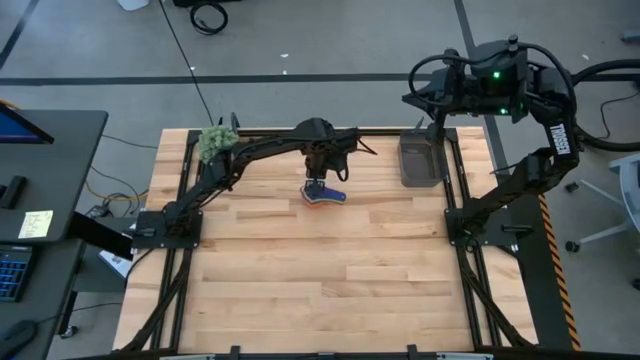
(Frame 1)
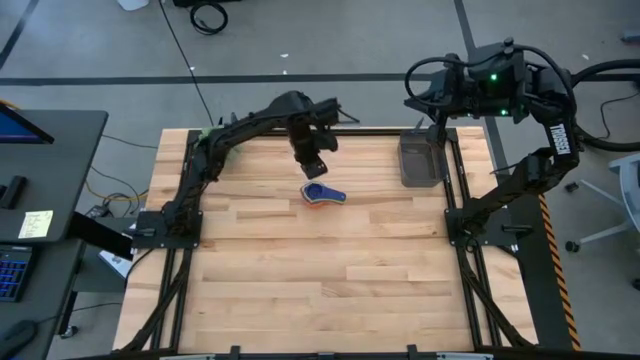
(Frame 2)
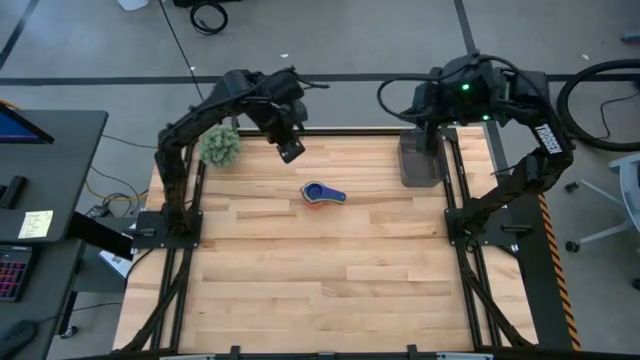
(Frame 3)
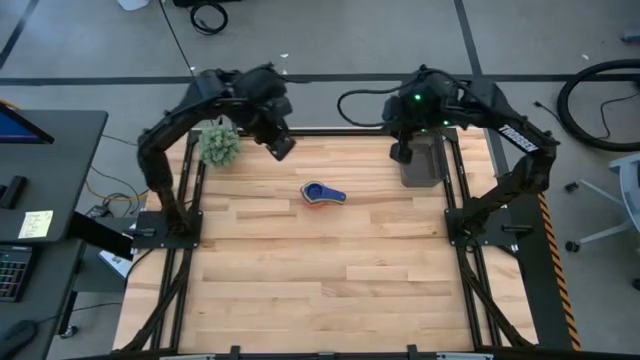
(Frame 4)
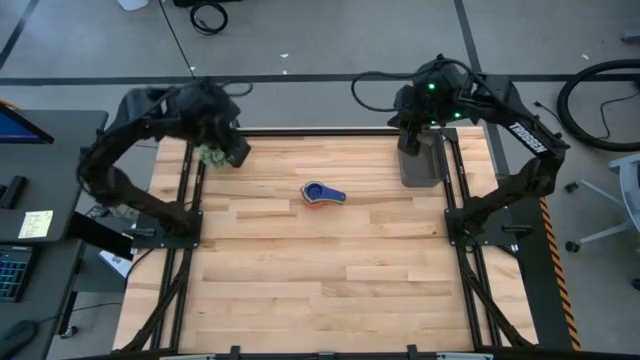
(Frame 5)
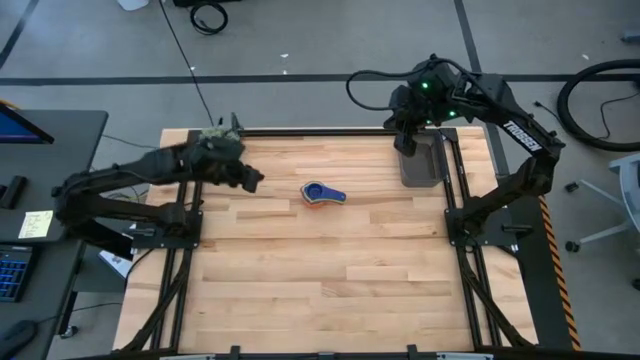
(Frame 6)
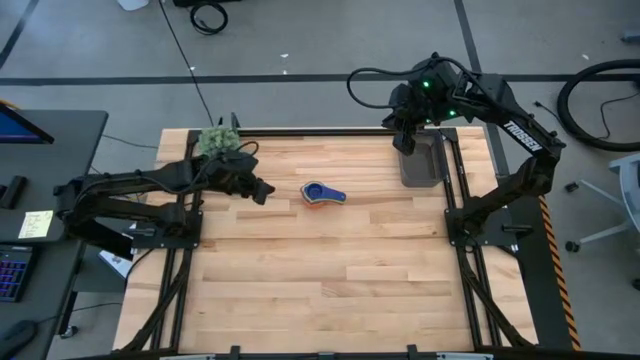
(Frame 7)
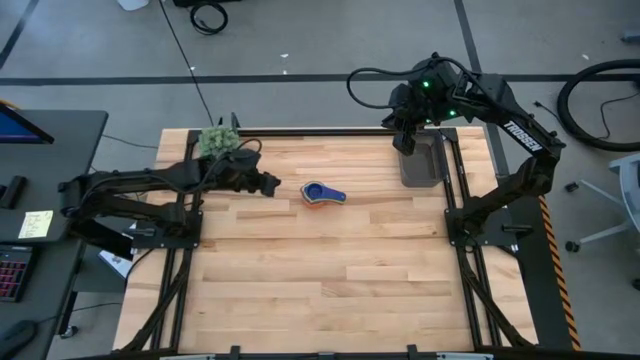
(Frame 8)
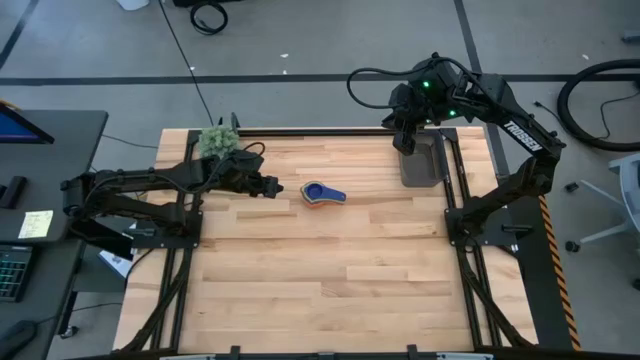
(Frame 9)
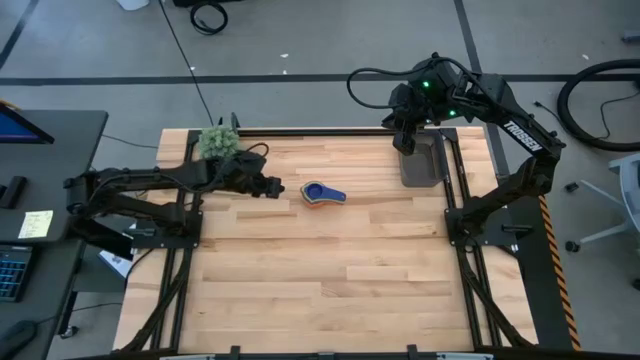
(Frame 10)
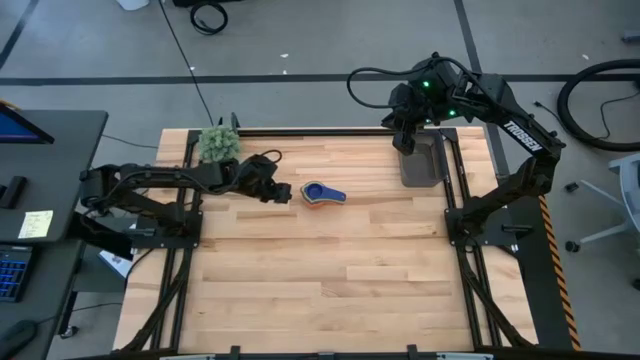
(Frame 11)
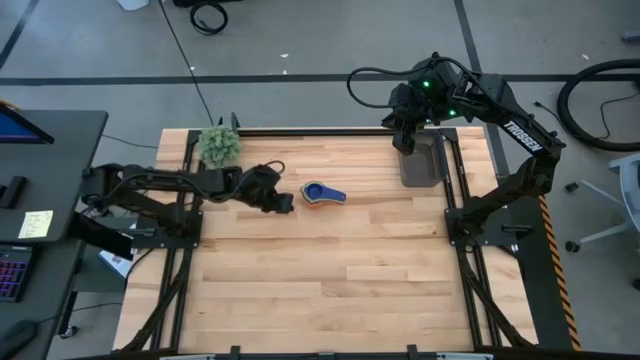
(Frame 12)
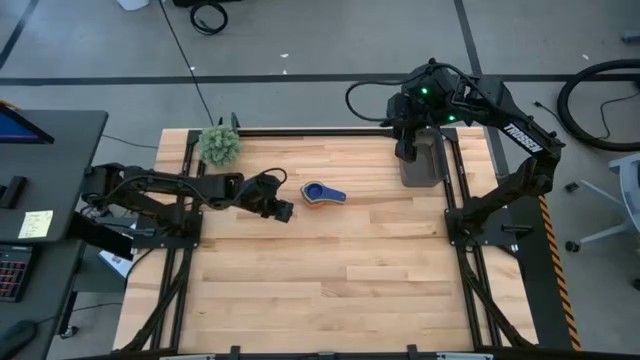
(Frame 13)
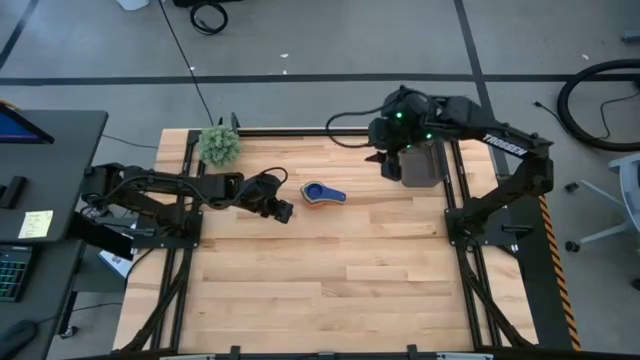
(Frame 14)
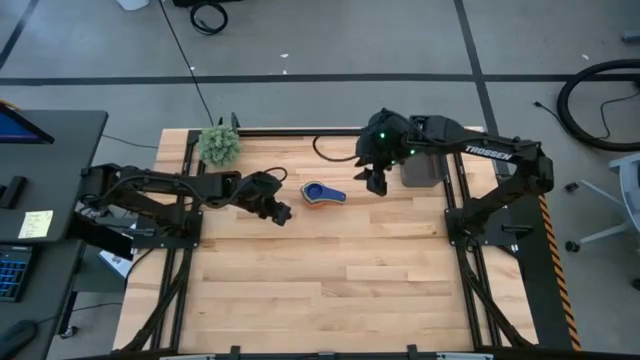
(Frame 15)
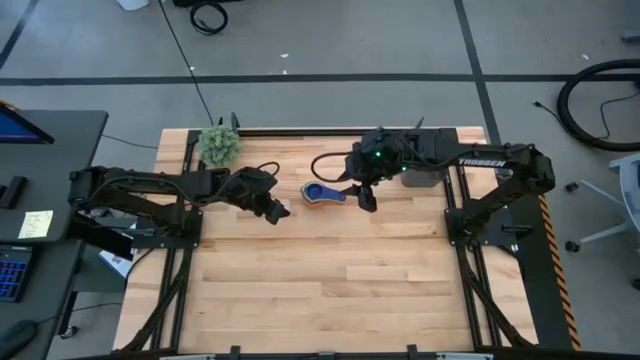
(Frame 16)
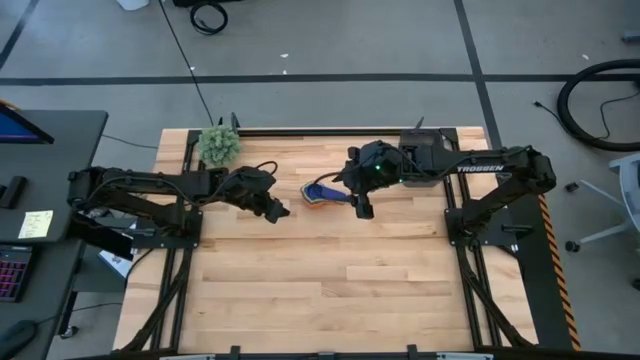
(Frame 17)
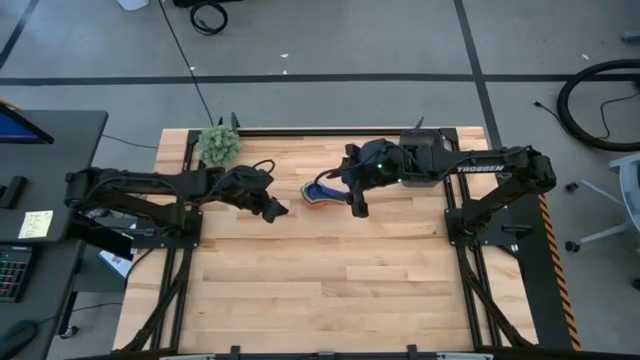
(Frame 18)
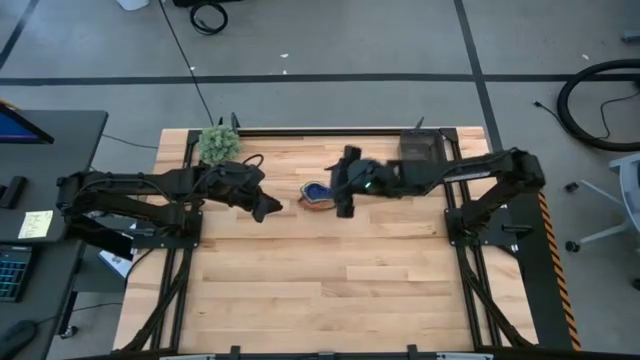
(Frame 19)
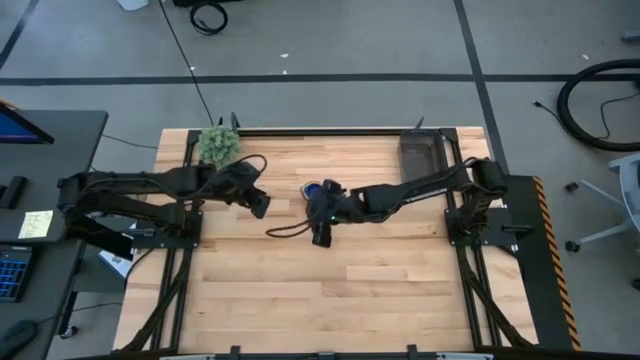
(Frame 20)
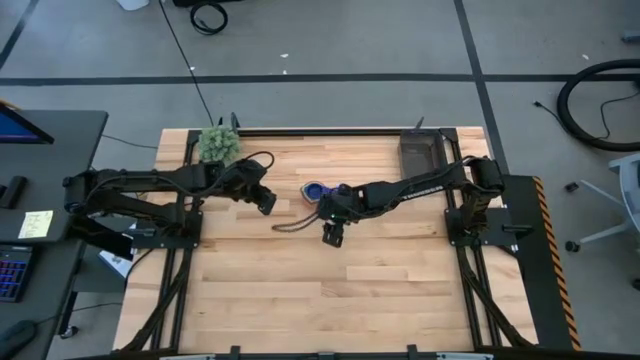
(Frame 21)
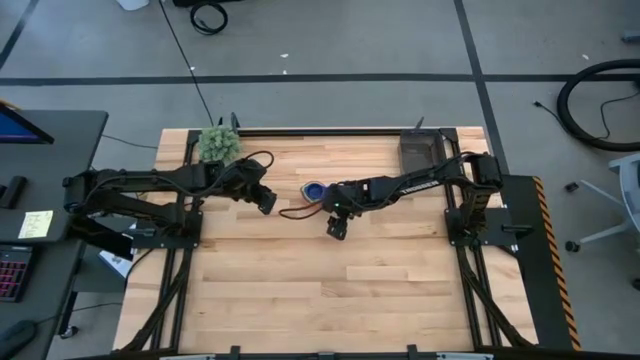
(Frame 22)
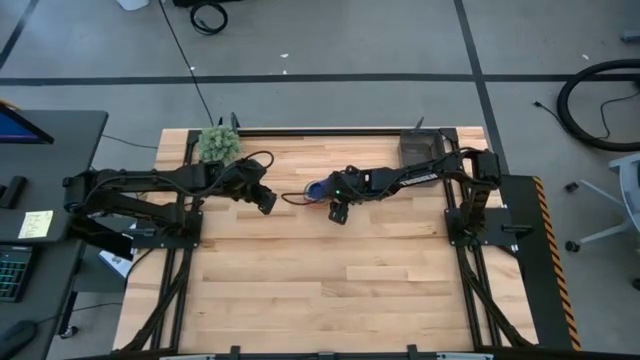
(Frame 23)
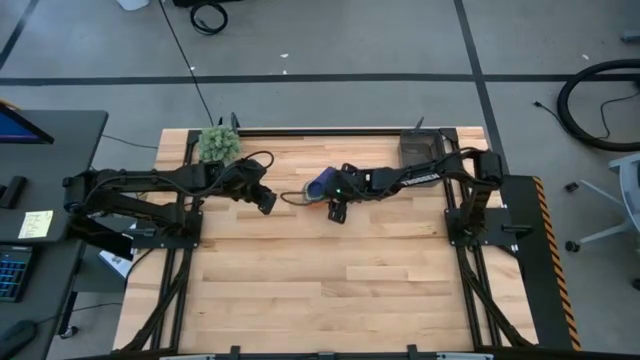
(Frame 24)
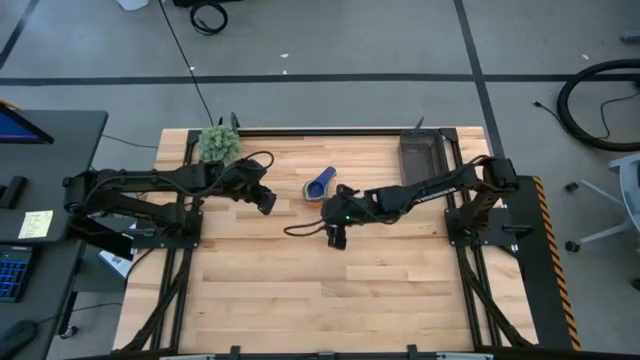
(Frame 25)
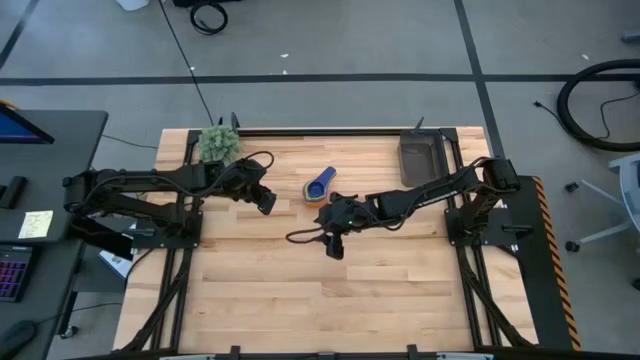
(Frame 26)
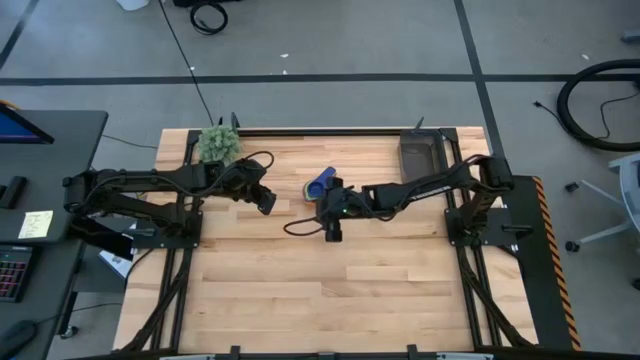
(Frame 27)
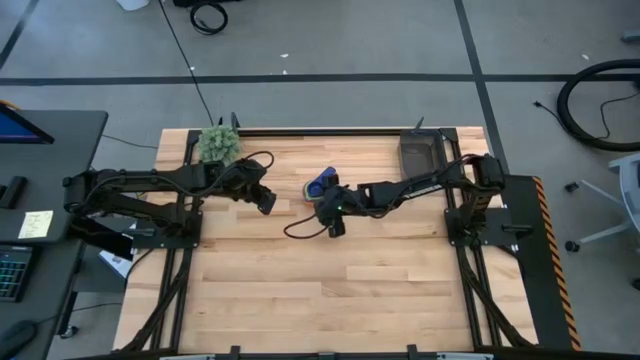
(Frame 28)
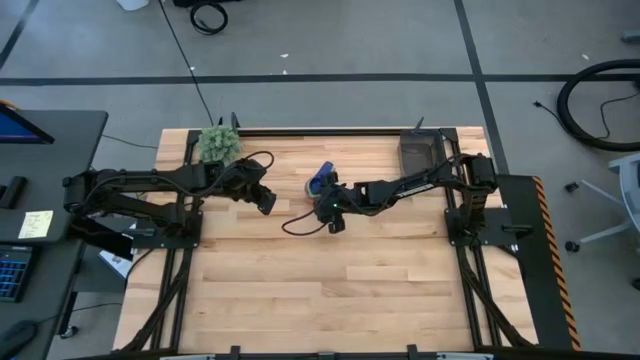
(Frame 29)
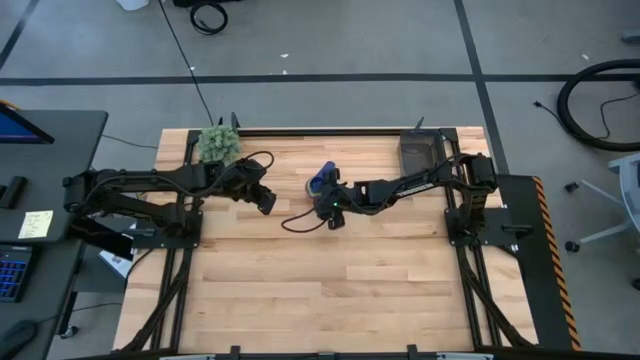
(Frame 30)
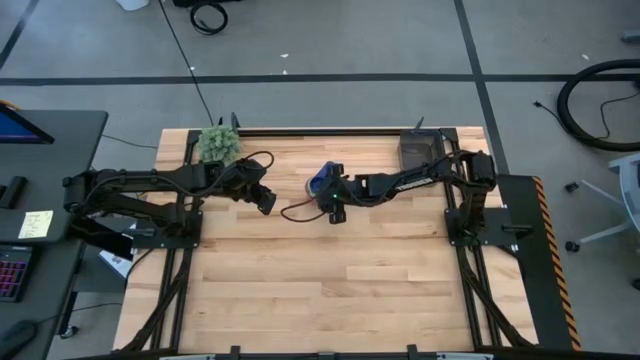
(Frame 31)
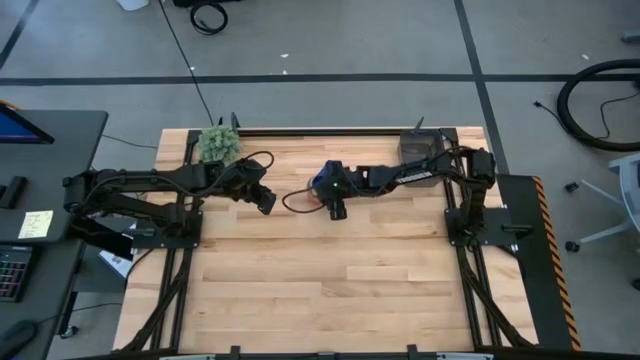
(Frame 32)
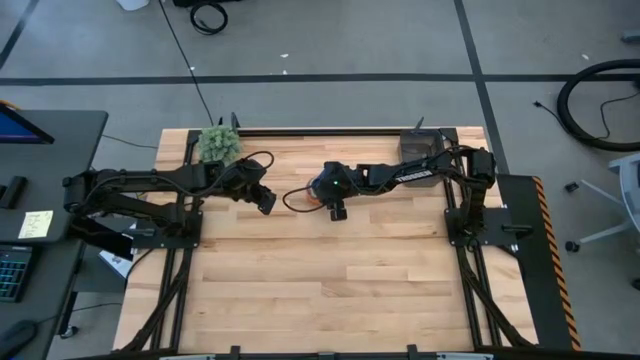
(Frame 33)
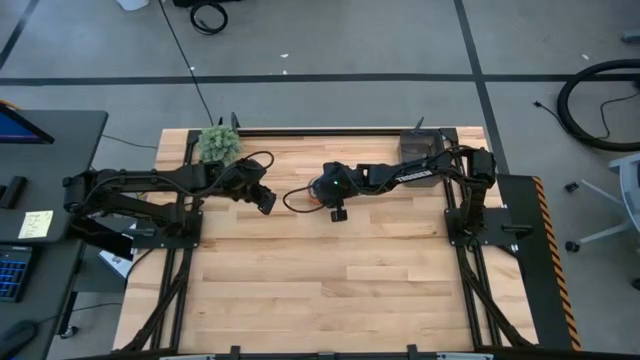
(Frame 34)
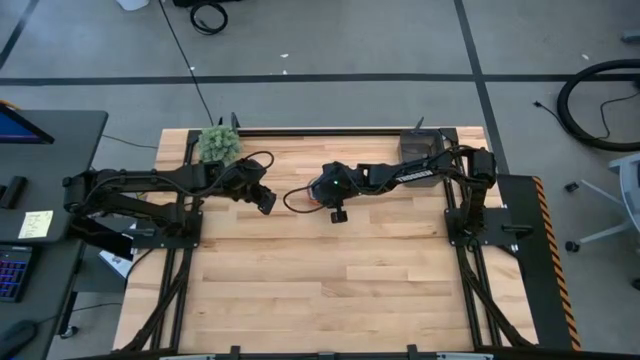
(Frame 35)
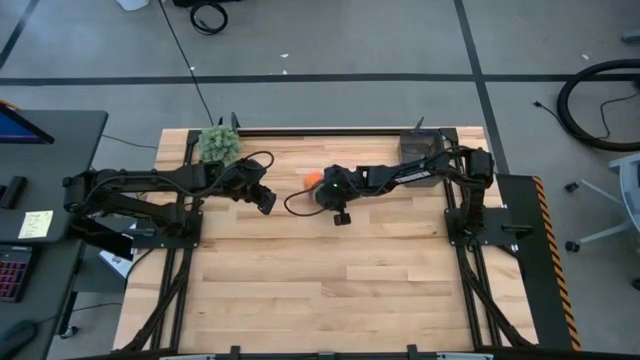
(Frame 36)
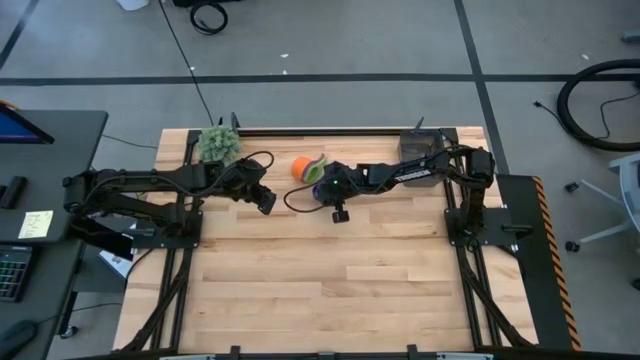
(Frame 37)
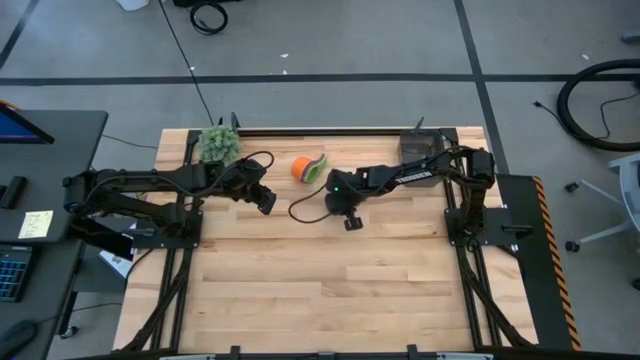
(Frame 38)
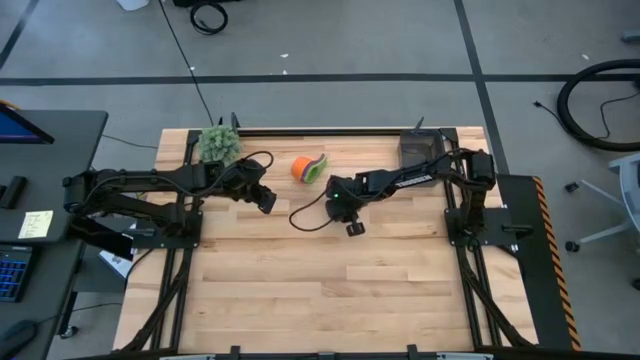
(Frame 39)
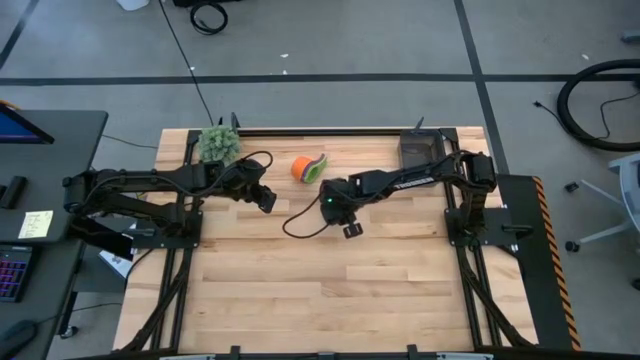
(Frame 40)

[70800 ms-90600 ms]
Task: Nest measuring cups in basket
Put the stack of measuring cups into the black bin
